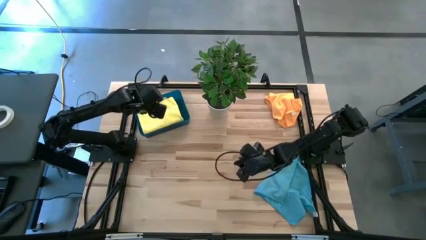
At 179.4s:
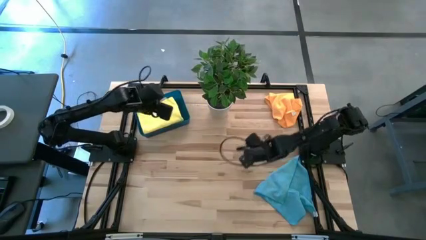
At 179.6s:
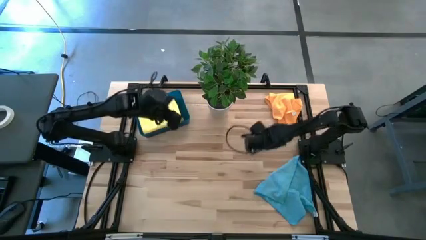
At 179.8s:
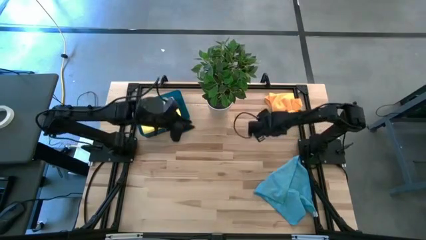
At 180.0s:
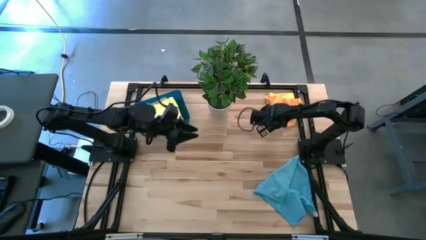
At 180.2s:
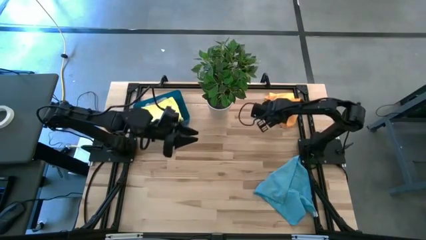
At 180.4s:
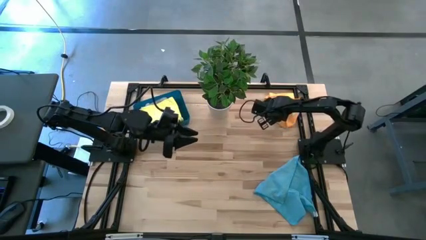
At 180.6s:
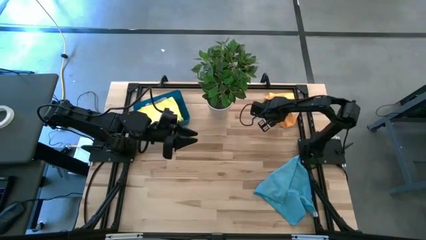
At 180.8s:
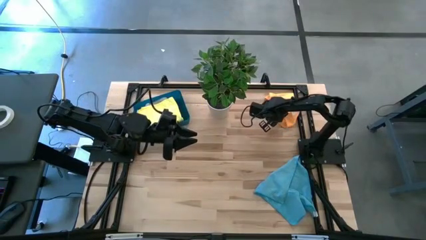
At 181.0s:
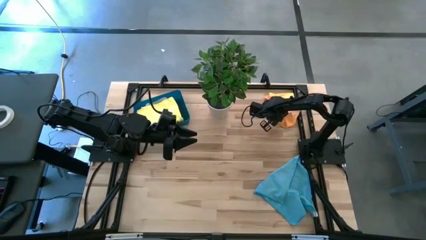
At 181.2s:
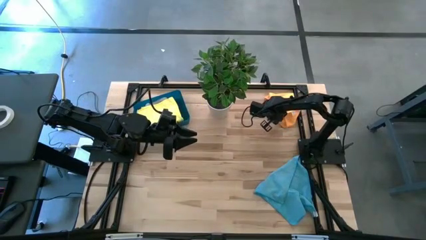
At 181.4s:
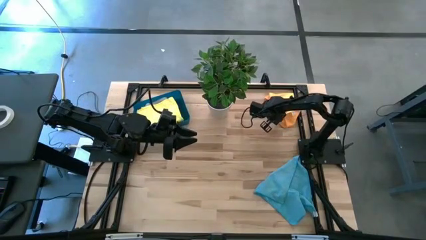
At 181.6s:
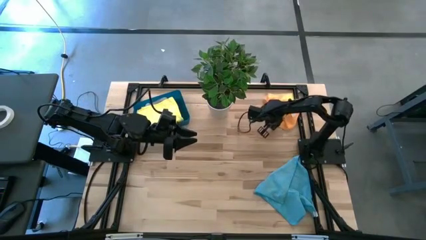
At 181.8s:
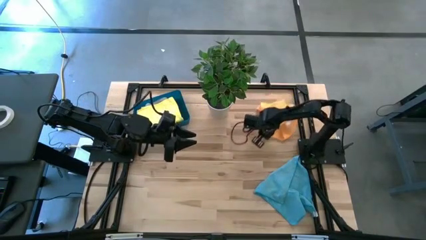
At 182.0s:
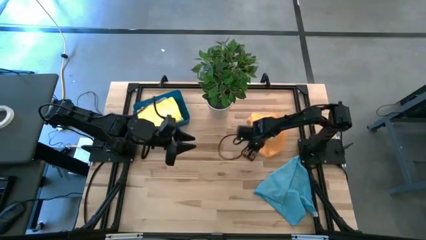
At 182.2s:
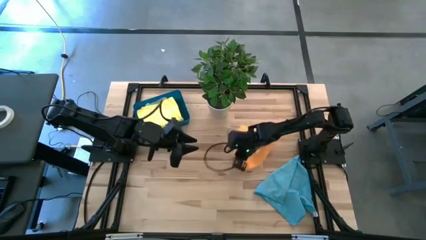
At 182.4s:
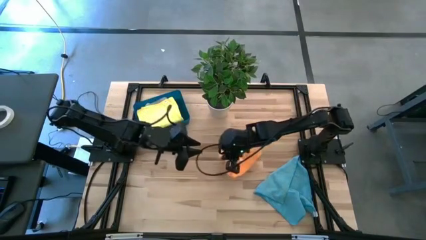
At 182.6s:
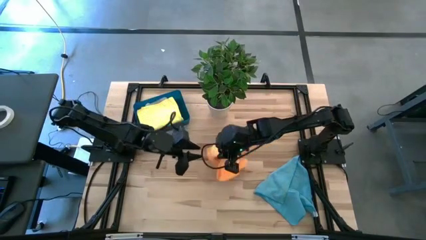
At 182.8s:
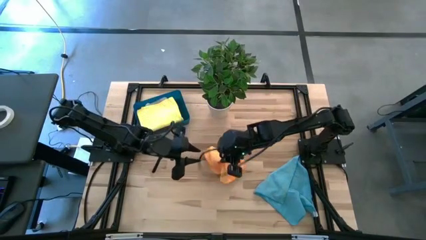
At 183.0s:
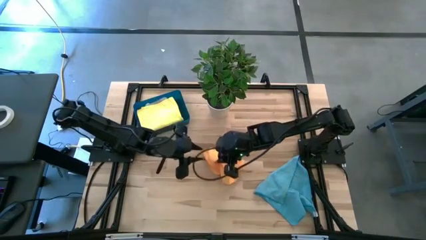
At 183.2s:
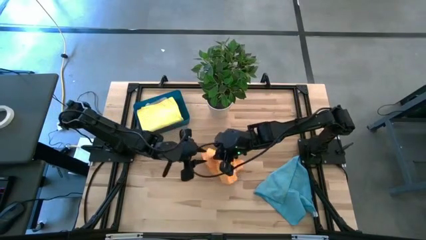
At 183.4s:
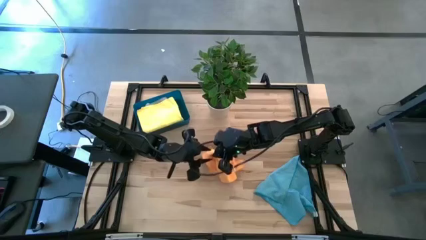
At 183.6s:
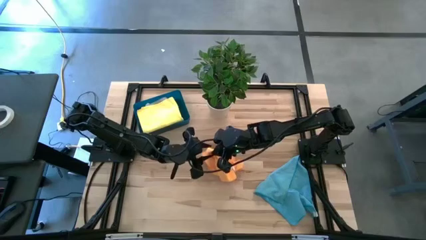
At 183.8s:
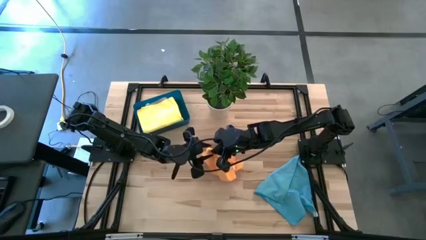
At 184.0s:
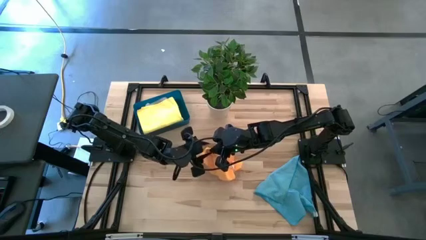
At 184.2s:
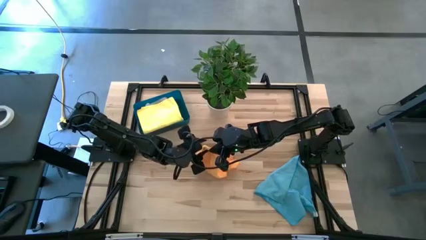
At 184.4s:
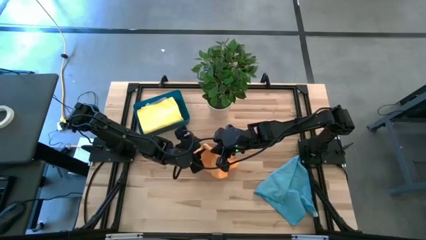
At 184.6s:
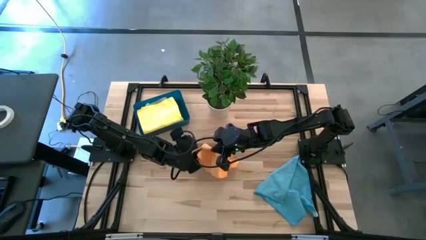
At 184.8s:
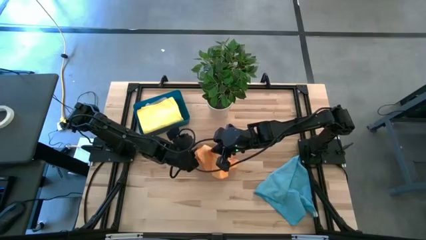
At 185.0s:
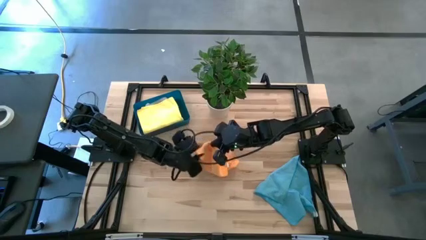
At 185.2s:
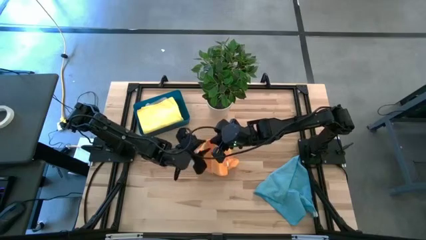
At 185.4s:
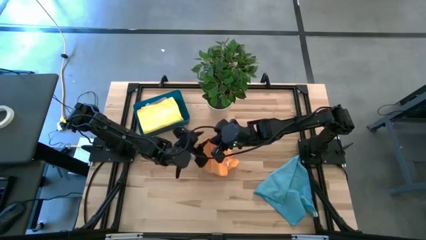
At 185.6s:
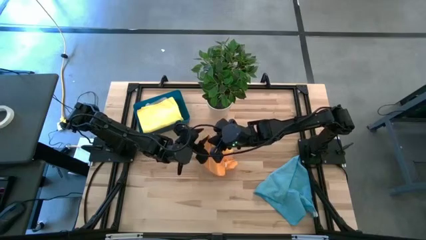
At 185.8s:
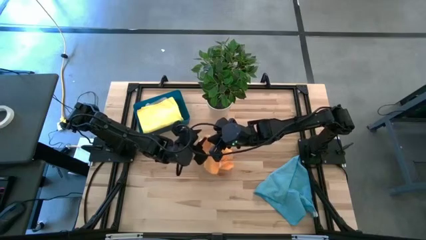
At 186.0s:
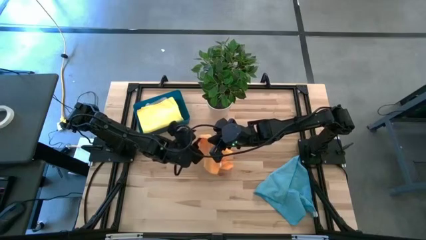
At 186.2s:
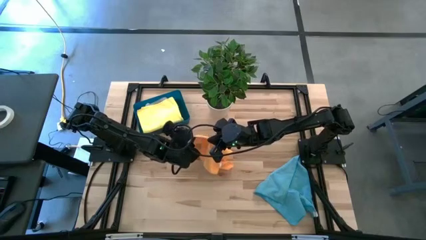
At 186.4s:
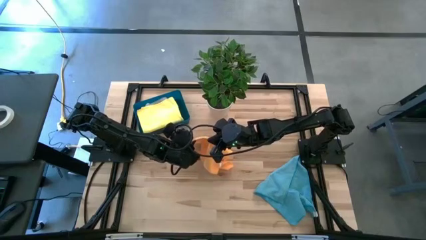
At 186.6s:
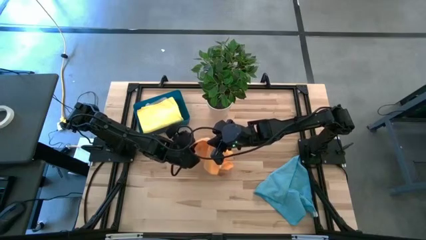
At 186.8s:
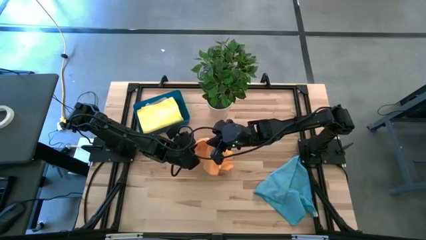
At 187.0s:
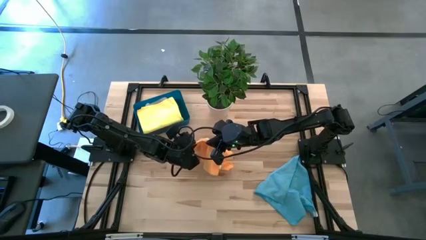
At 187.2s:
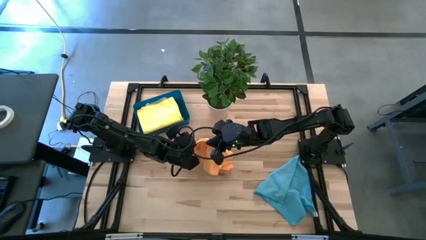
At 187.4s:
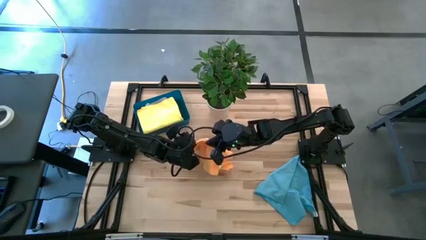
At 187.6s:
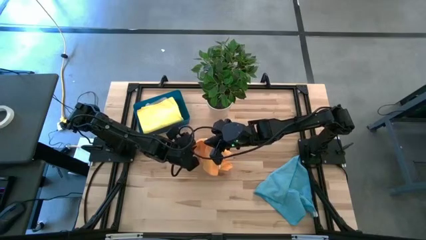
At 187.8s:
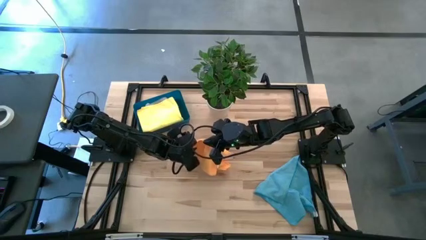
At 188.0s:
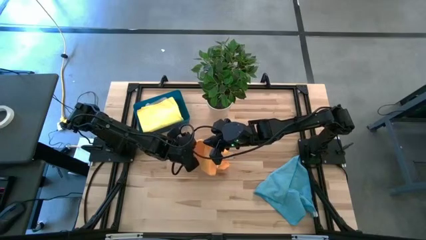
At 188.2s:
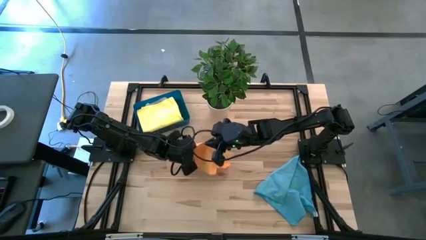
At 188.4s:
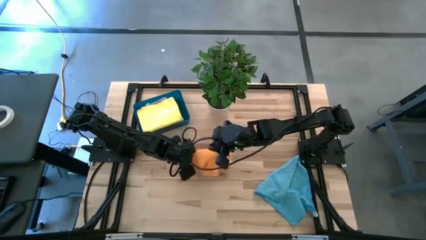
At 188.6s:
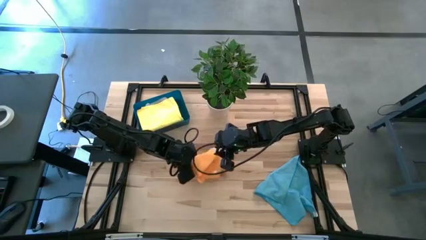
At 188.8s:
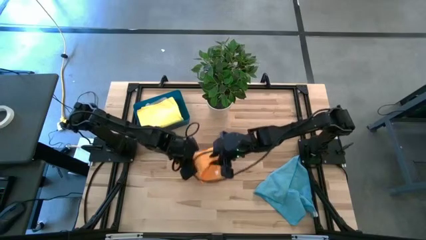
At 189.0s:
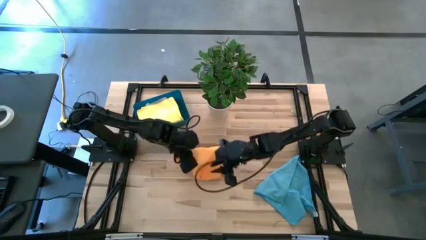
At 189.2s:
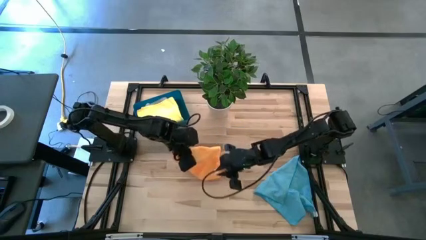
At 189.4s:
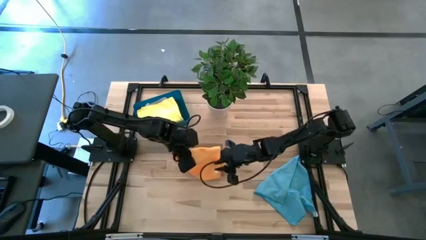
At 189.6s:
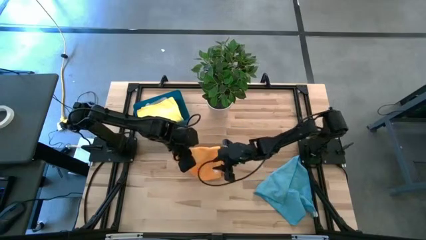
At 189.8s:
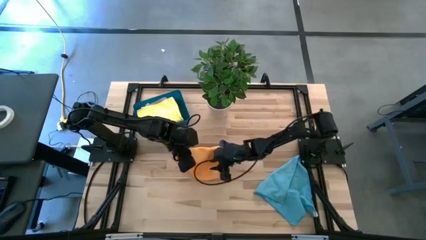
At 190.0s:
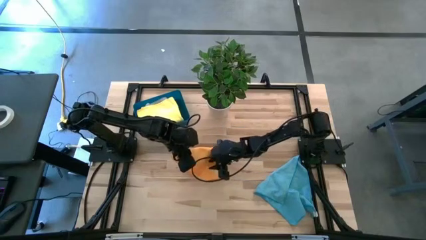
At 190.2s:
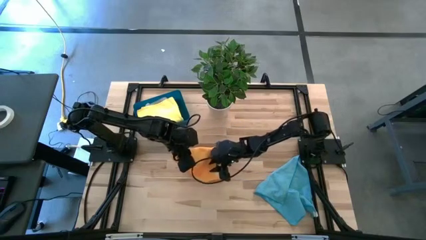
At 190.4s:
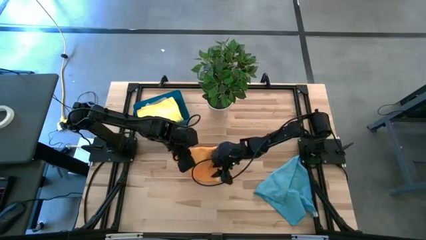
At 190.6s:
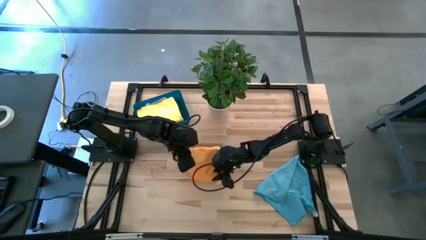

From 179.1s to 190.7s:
Task: Fold microfiber towels
Fold the orange towel
